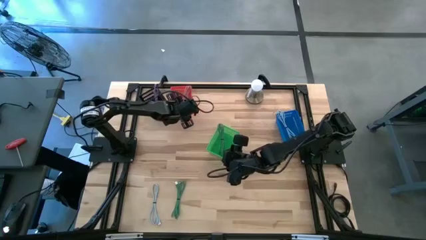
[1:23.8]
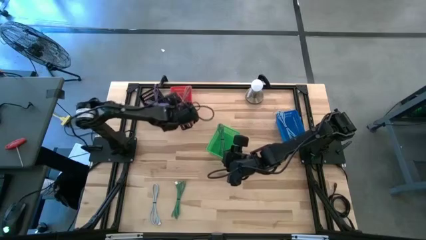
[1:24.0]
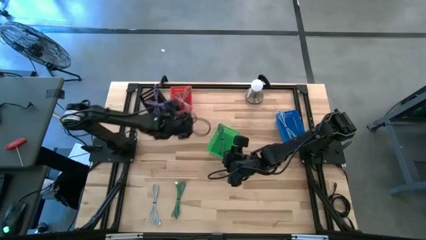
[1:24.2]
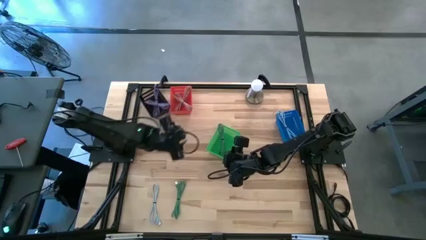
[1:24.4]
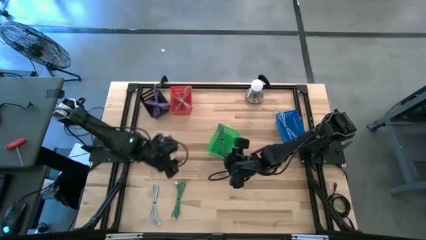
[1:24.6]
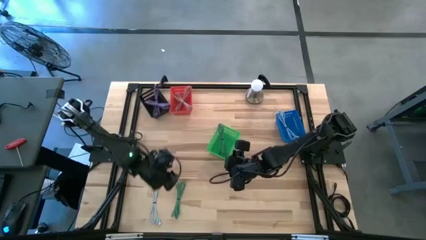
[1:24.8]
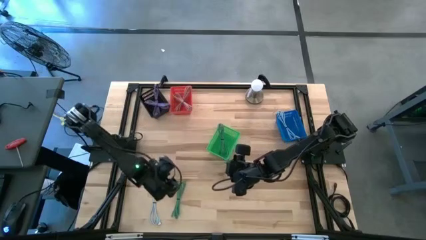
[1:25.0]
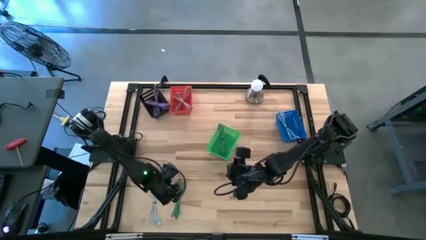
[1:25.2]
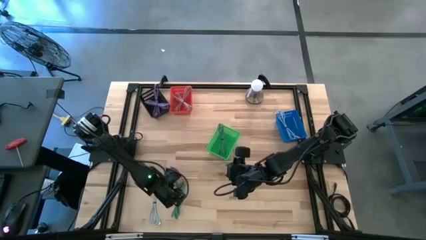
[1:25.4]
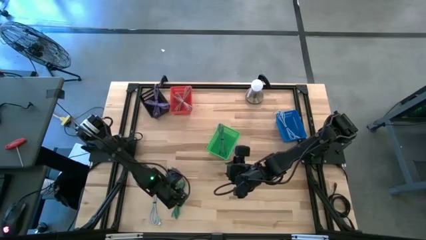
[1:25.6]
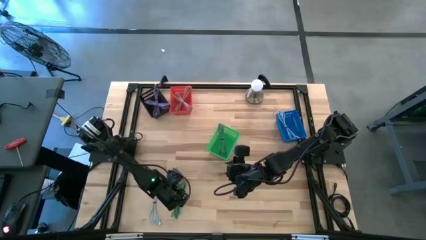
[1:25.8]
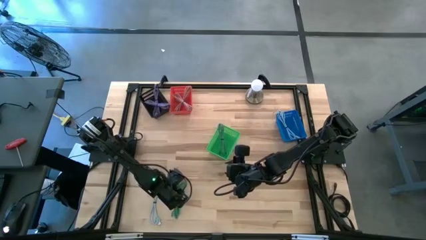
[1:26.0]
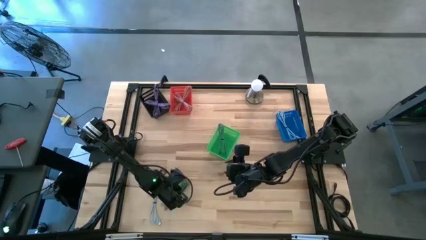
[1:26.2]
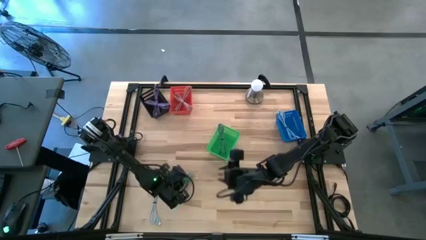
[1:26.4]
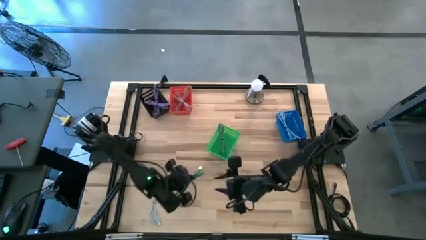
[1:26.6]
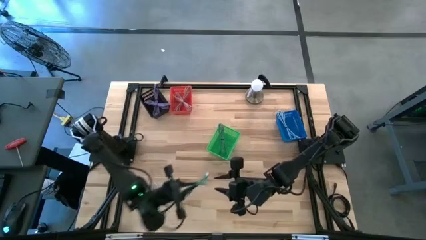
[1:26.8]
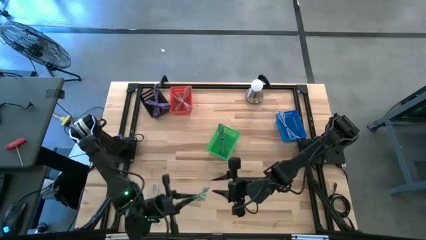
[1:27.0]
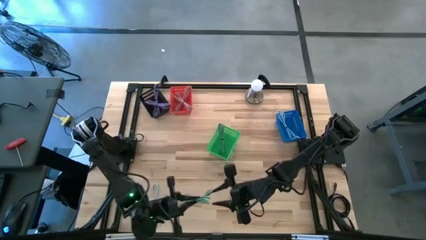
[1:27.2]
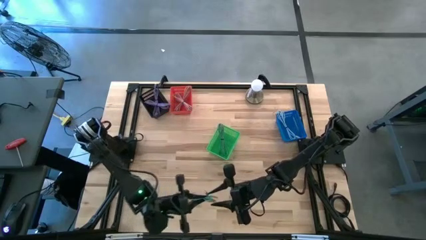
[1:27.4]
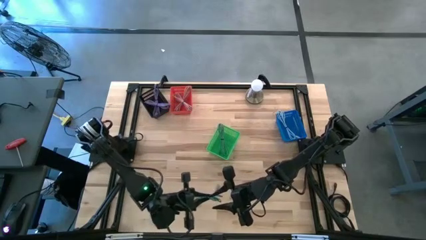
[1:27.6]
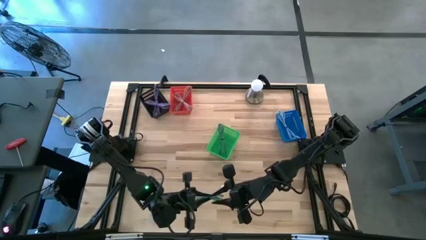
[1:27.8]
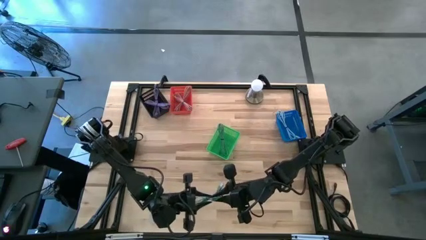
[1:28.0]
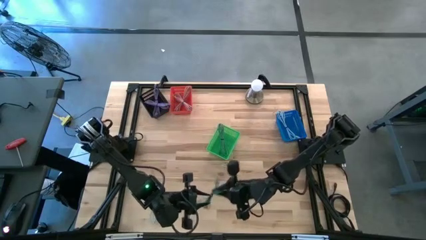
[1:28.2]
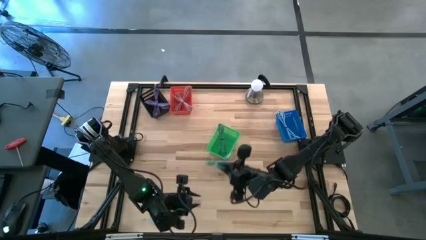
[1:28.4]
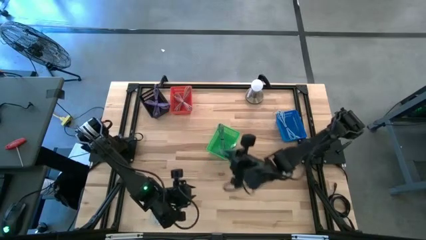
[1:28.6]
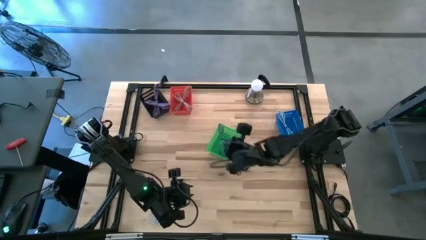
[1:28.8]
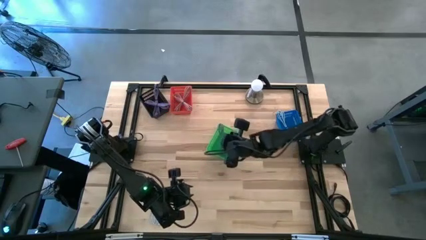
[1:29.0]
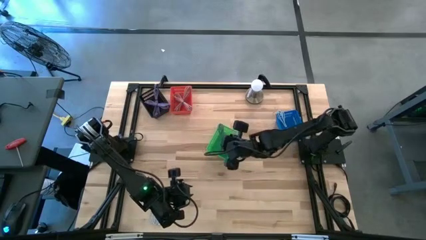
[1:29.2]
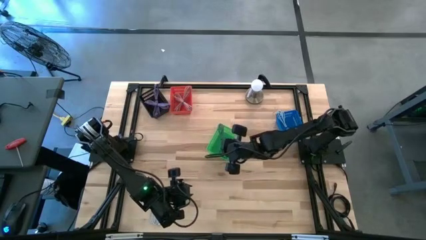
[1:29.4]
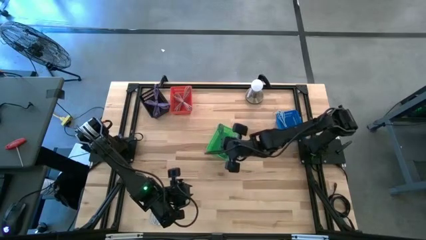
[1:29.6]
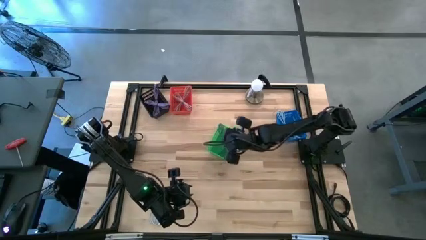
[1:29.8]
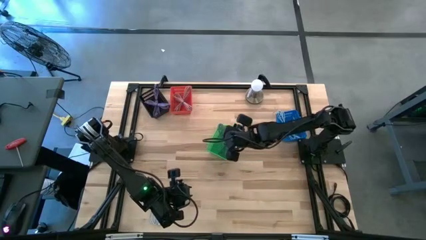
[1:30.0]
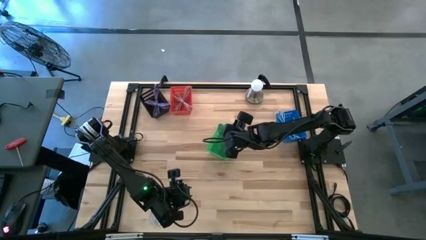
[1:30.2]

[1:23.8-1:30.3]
Task: Pick & Place USB Port
Put the green charger cable into the green basket

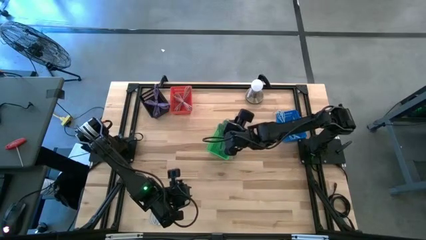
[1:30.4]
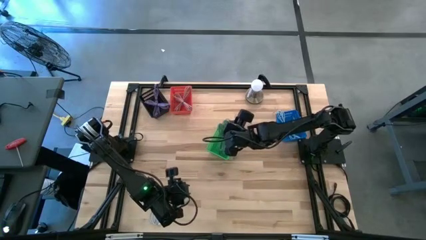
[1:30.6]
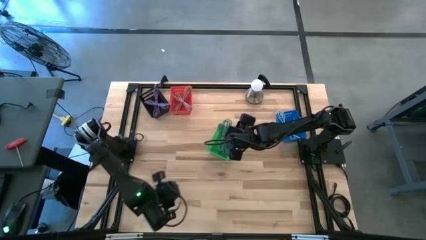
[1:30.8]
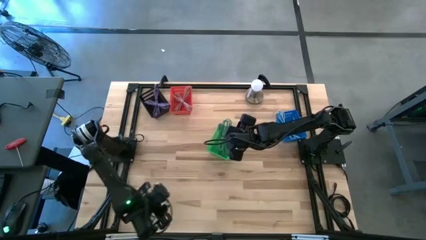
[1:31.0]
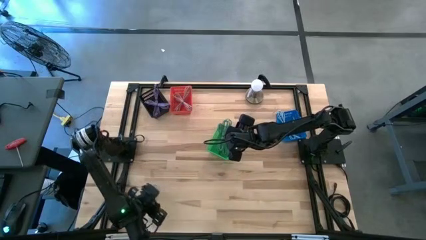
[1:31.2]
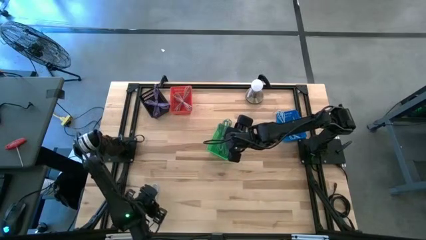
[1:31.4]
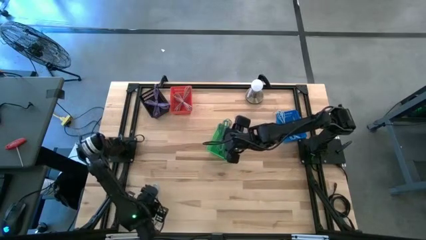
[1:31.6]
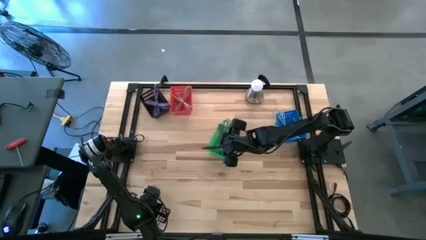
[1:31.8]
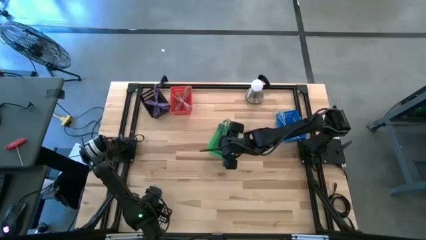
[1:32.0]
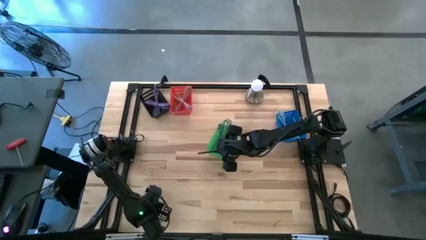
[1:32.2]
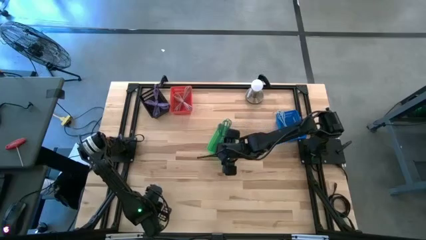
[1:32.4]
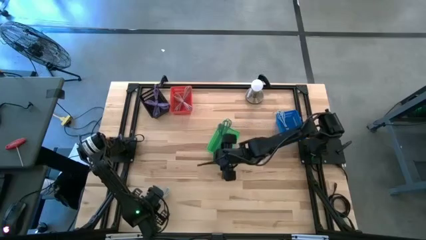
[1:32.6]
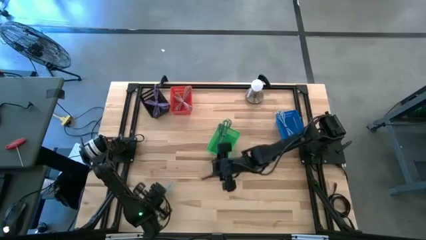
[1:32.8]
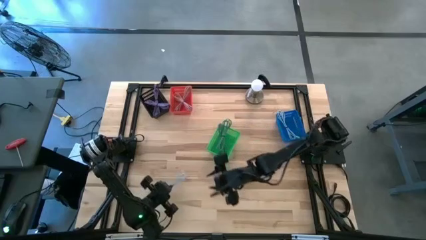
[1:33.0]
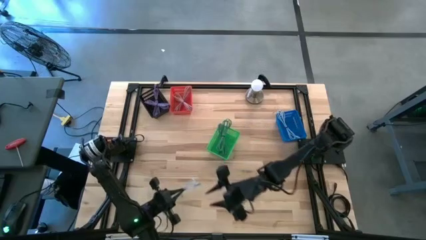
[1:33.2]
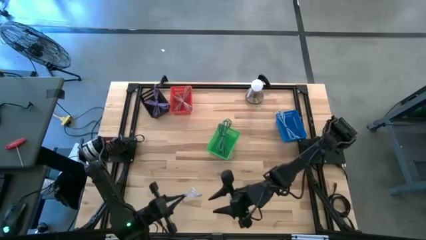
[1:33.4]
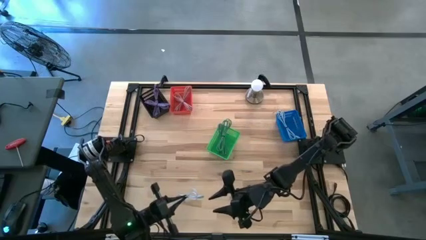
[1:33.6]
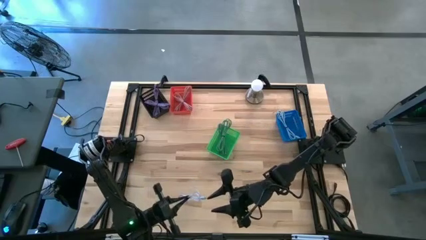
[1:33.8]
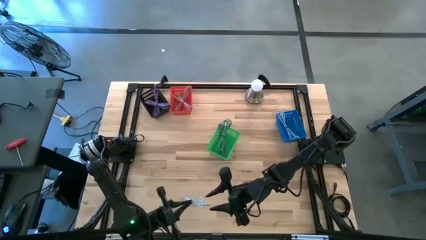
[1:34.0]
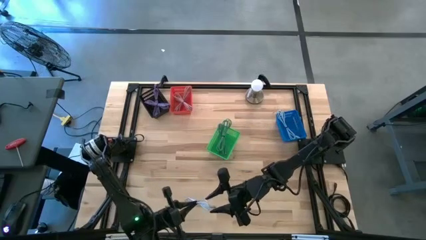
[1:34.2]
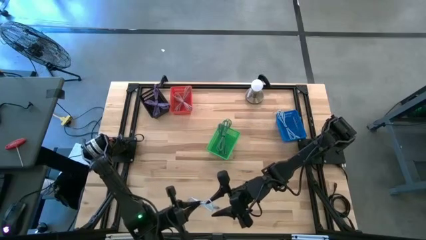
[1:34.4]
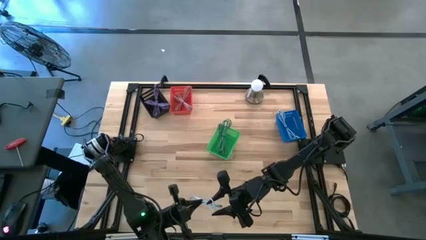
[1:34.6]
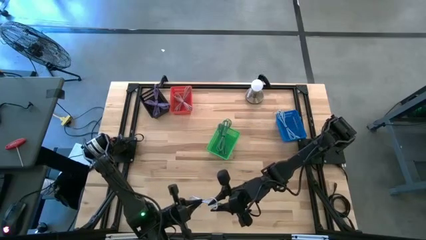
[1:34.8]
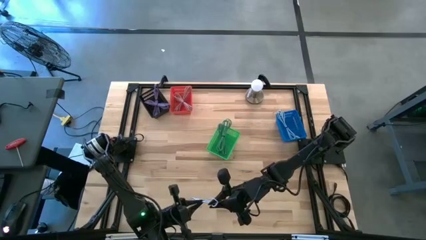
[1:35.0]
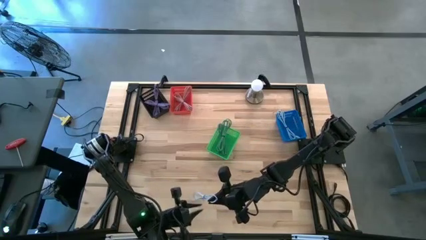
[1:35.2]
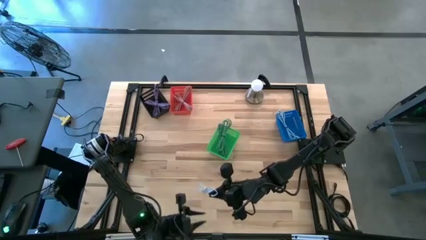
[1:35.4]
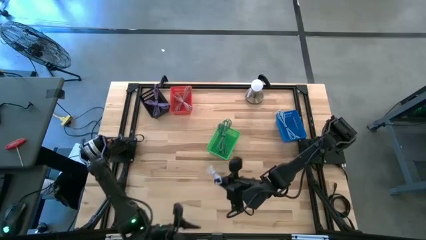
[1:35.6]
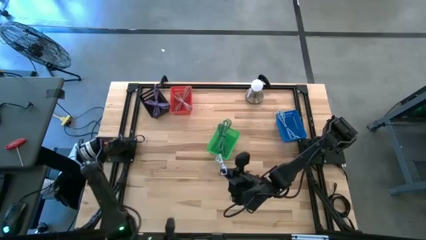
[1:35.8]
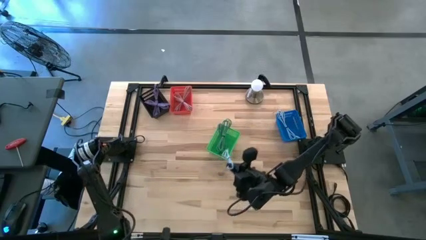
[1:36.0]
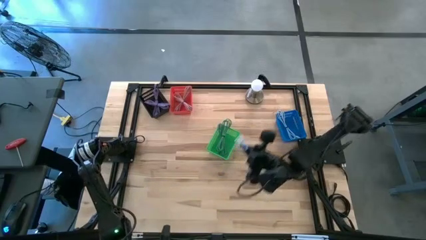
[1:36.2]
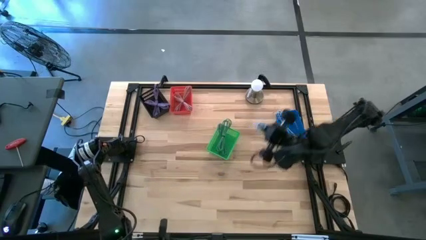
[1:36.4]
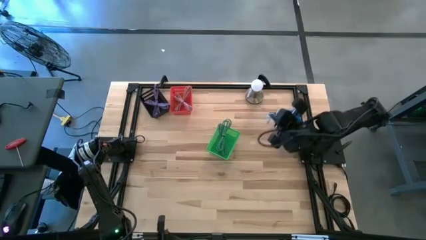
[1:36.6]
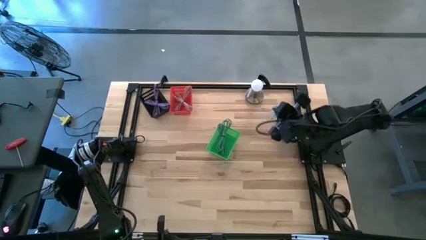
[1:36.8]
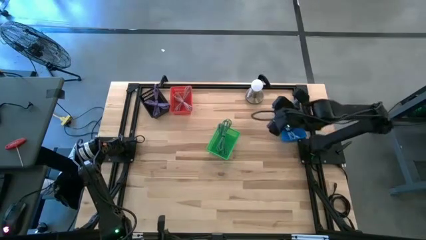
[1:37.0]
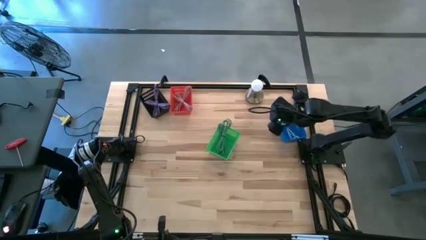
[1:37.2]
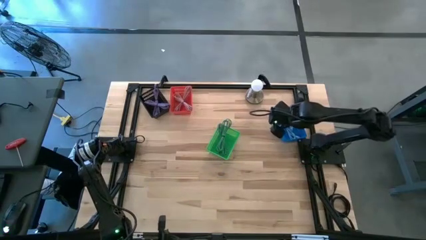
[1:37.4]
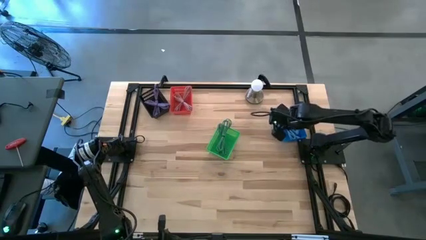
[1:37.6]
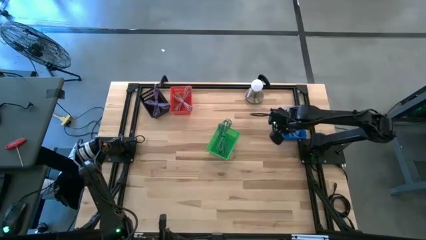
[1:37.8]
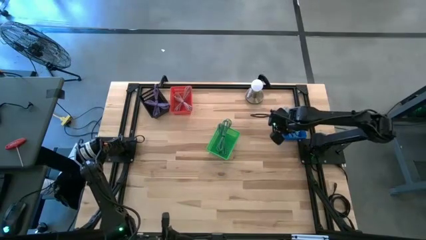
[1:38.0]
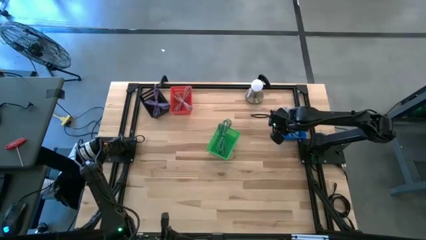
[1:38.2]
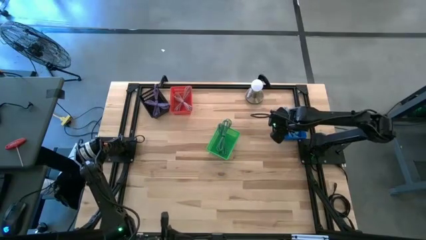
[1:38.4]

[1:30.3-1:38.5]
Put the white charger cable into the blue basket

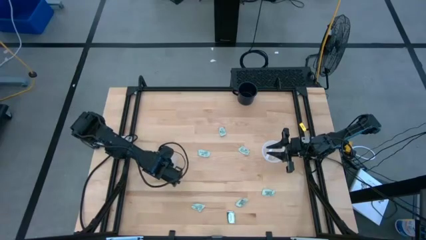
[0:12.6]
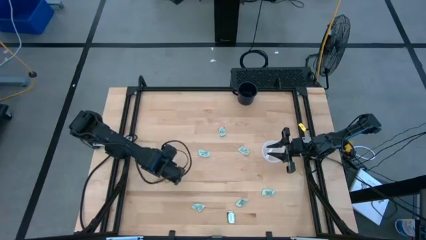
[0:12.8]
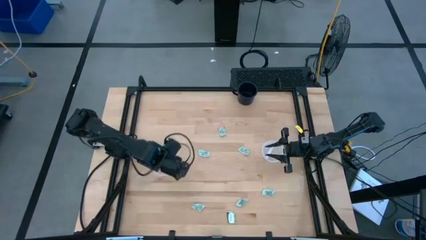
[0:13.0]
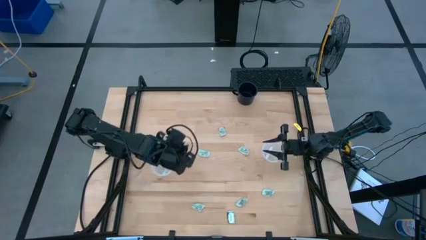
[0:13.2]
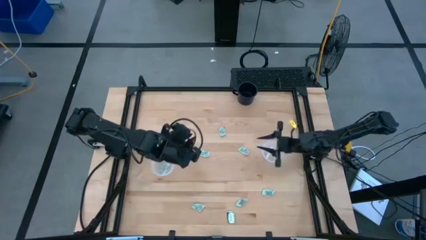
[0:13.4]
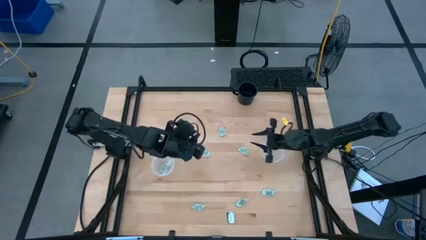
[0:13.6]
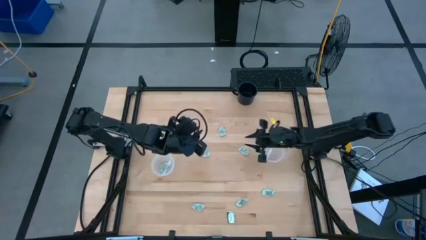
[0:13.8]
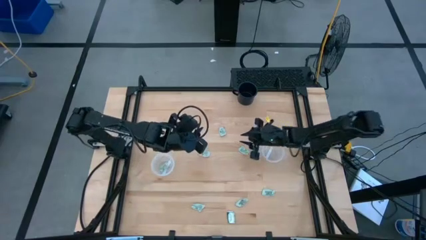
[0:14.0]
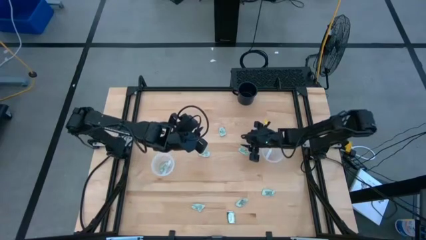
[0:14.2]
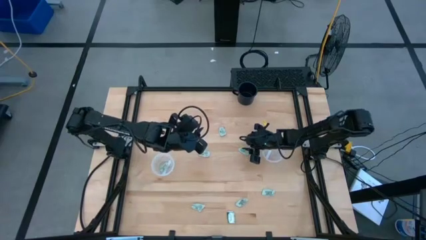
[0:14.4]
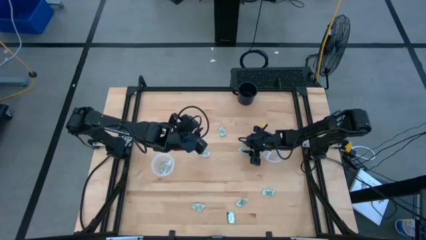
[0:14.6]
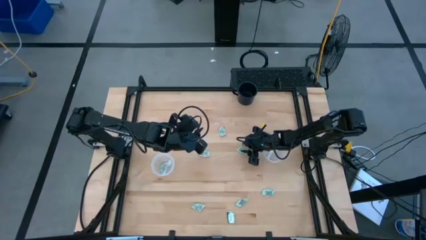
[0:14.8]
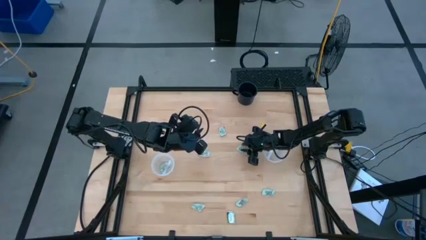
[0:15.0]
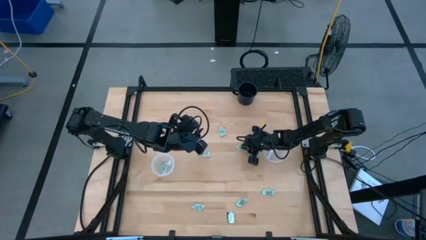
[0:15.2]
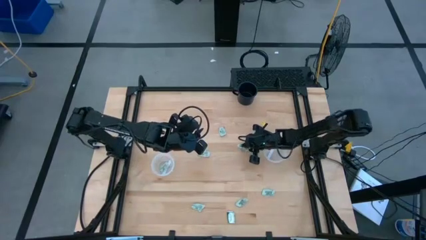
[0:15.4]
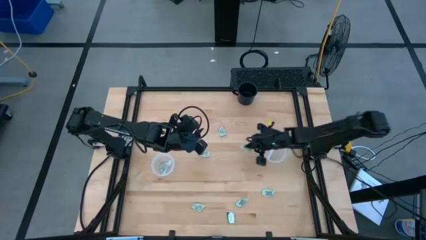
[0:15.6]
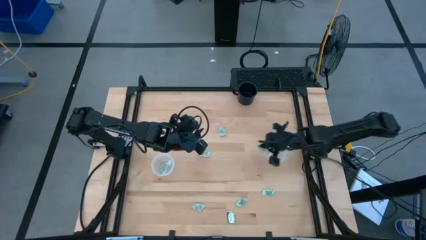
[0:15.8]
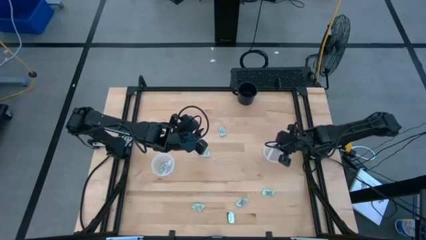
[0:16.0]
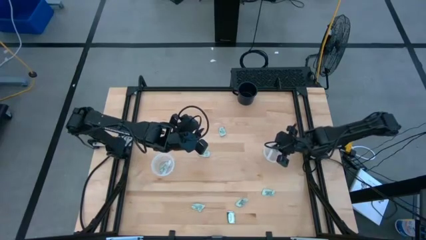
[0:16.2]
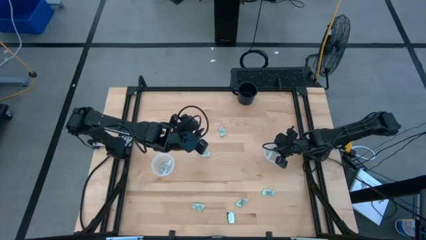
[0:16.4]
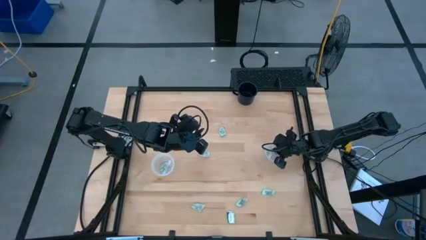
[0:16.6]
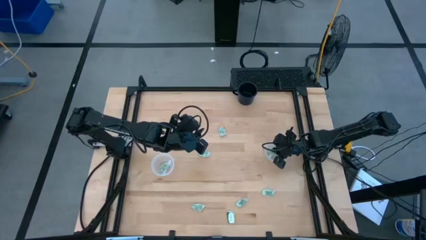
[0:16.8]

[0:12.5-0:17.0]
Task: Pick and place items into bin
Put the stevia packet into the right transparent bin
